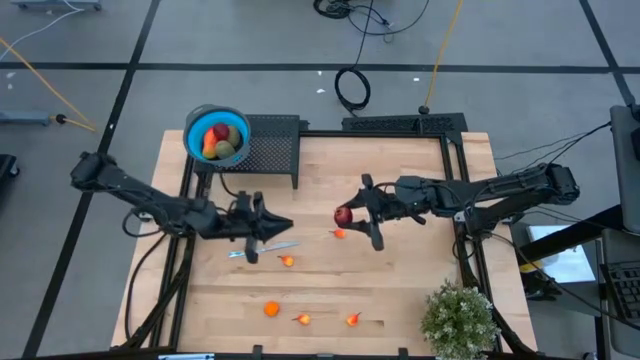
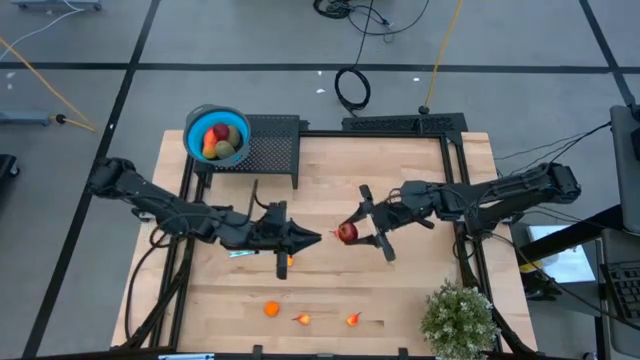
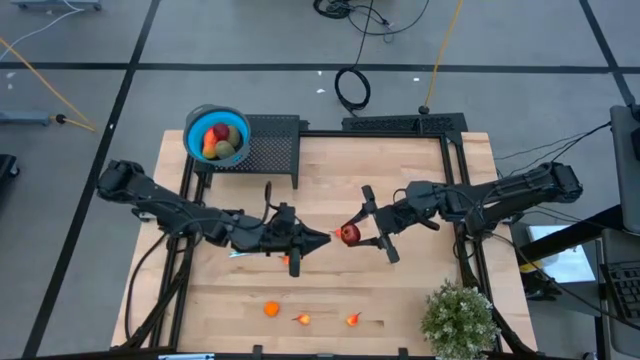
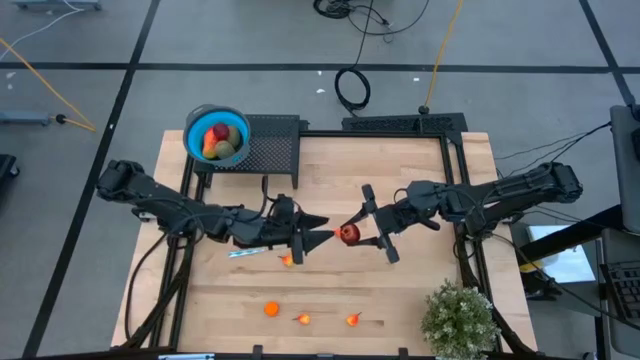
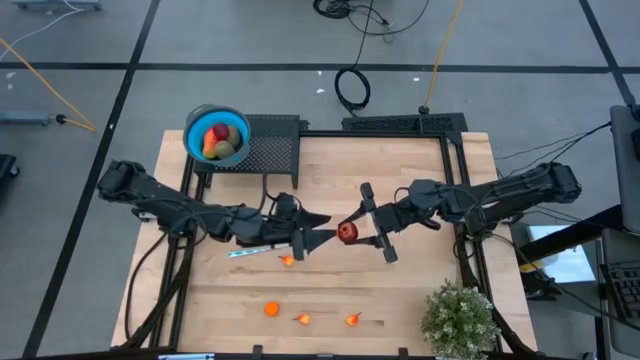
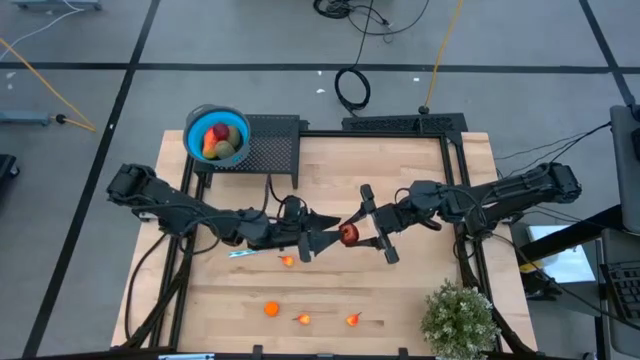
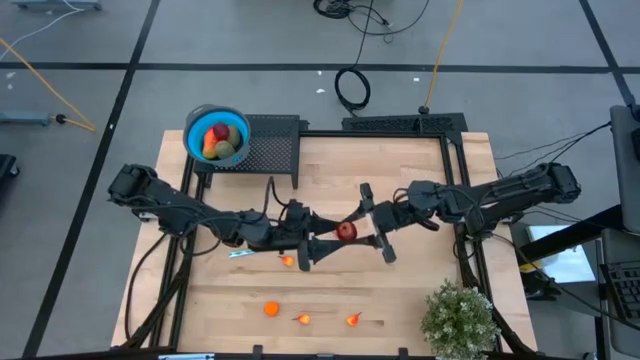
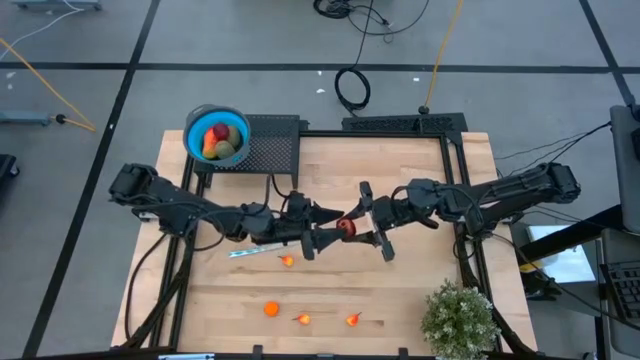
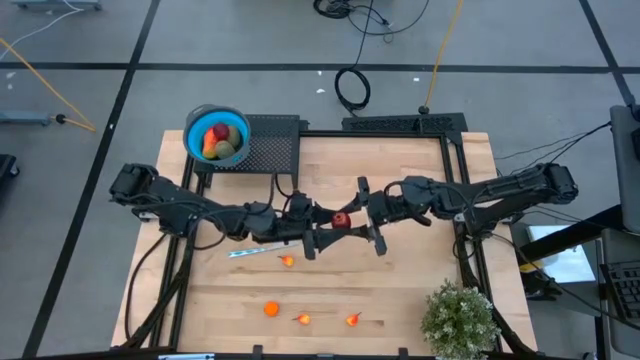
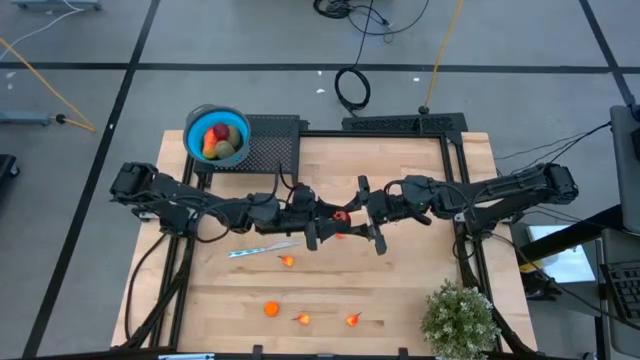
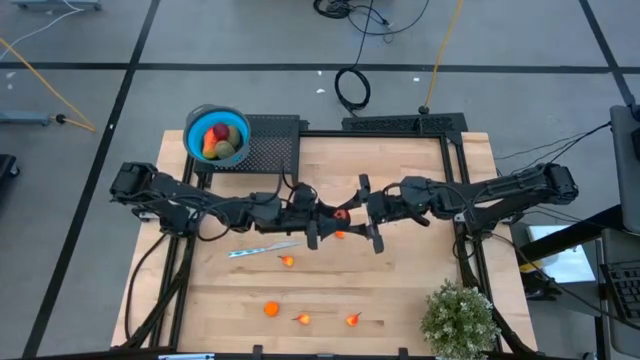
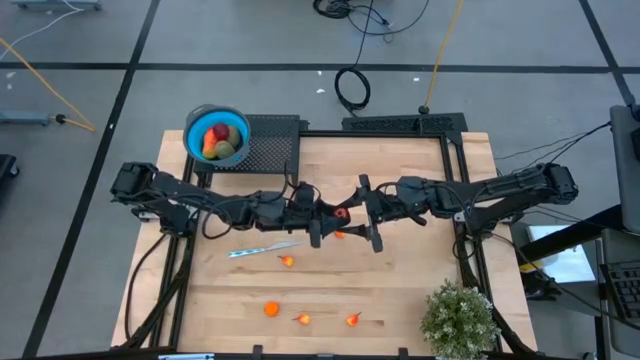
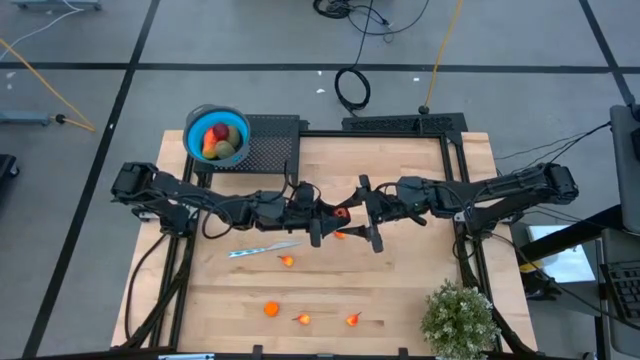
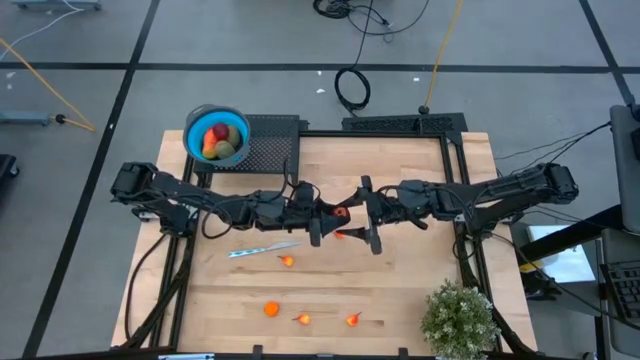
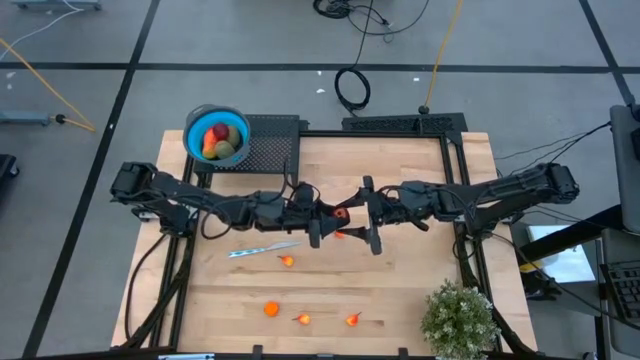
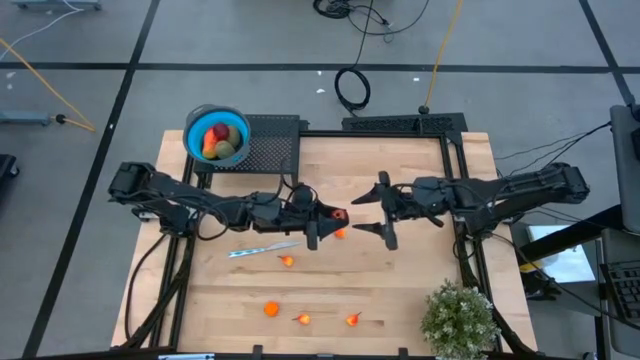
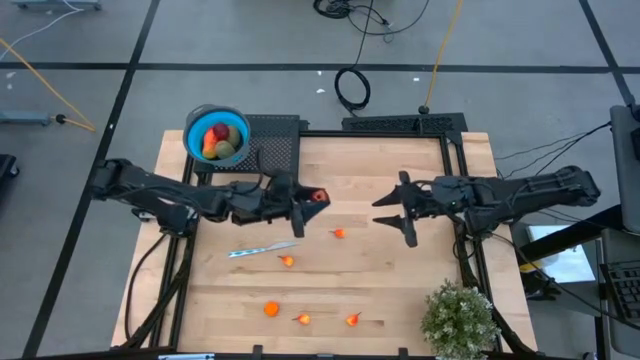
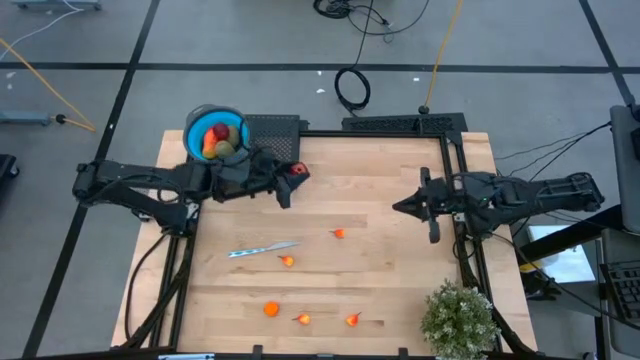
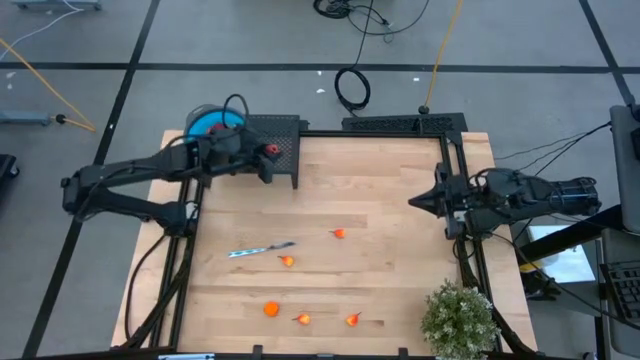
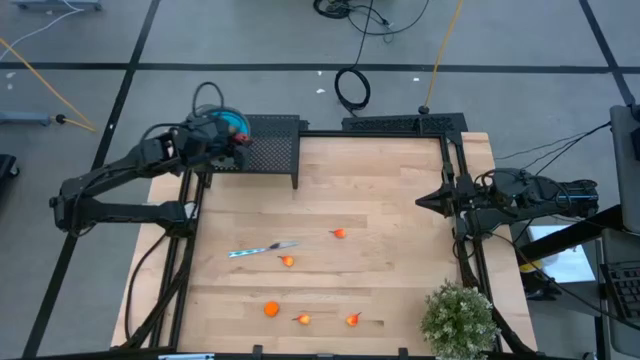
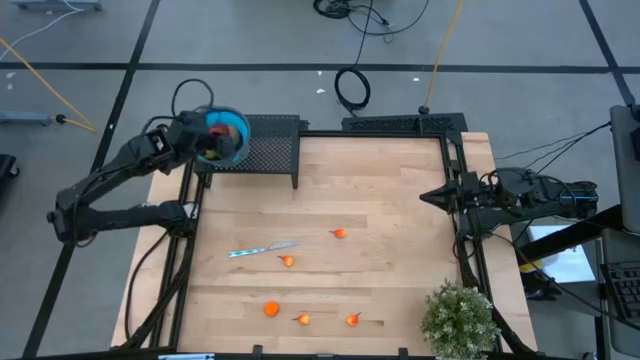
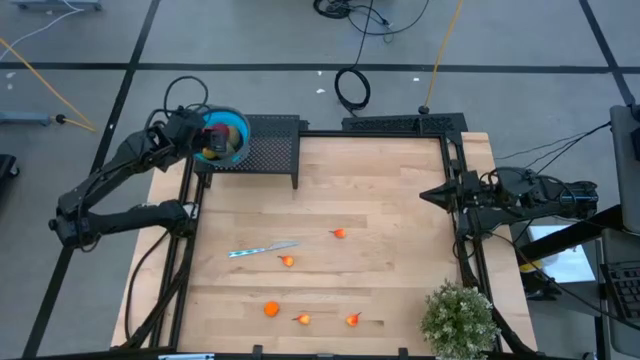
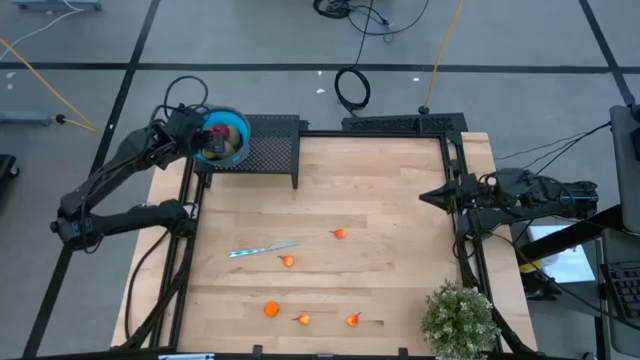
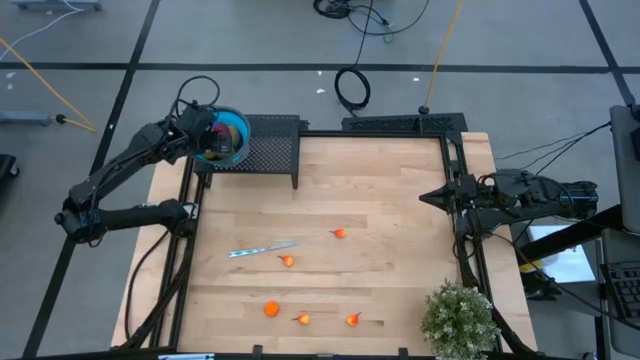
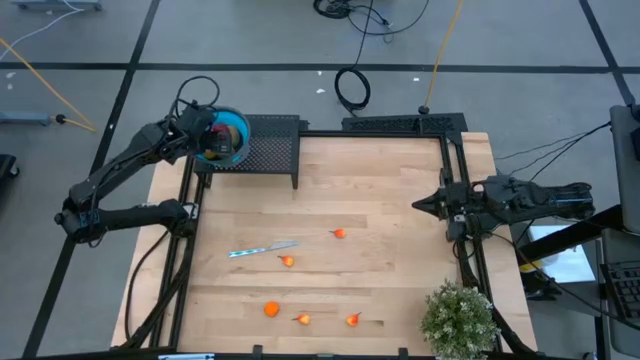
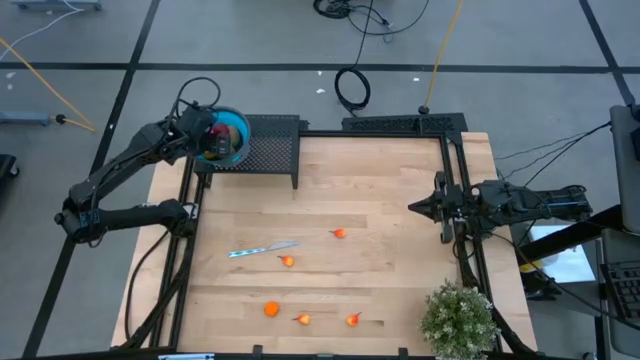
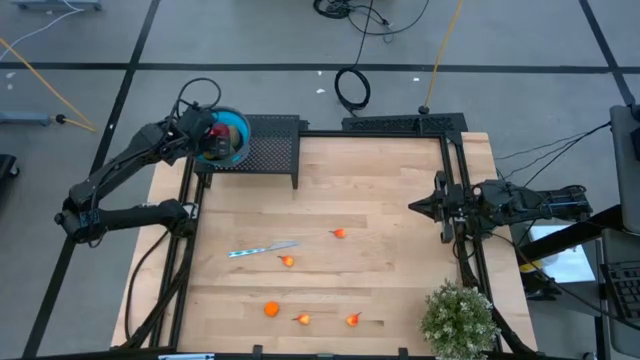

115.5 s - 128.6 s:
Task: Pick & Place Fruit
Put the pomegranate into the blue strainer bowl on the shelf

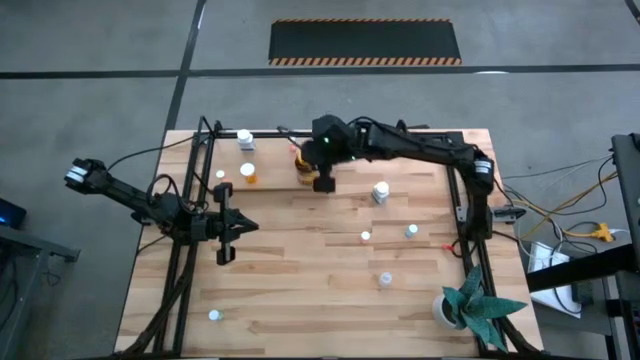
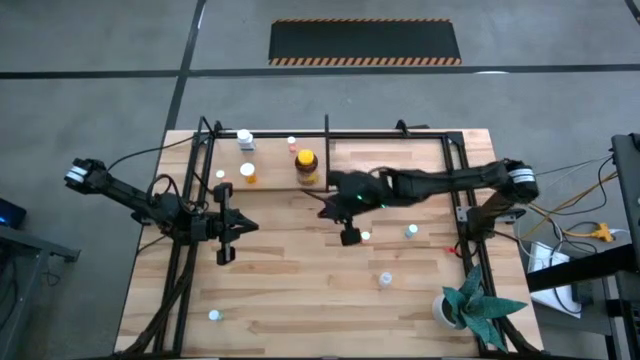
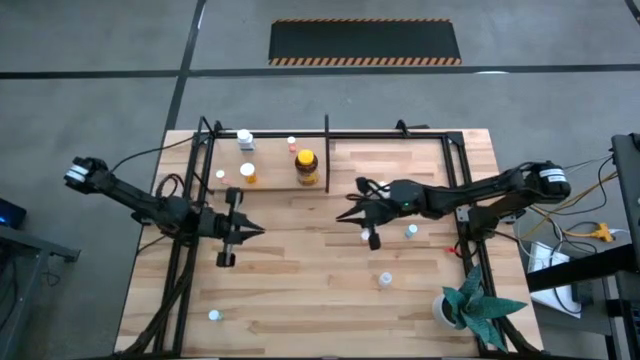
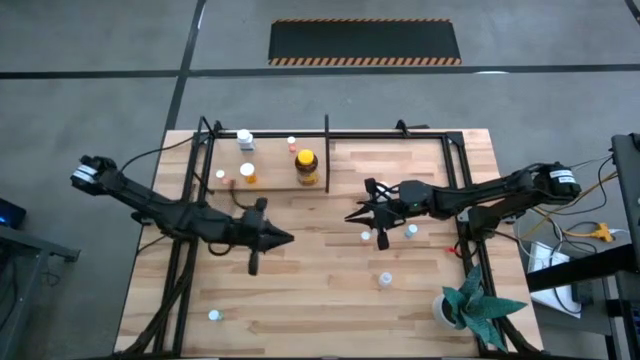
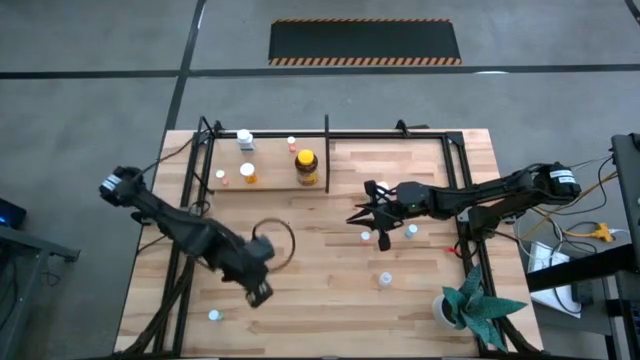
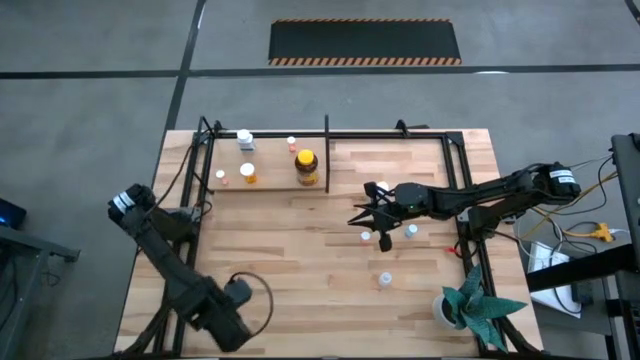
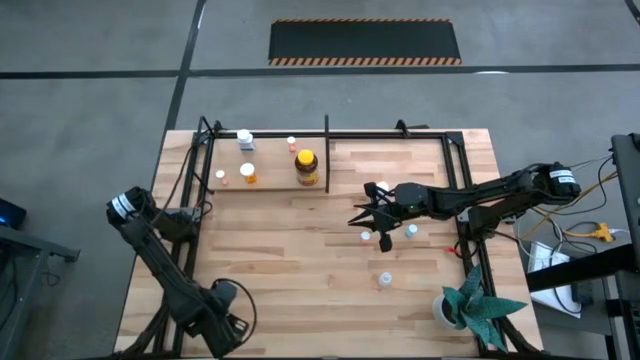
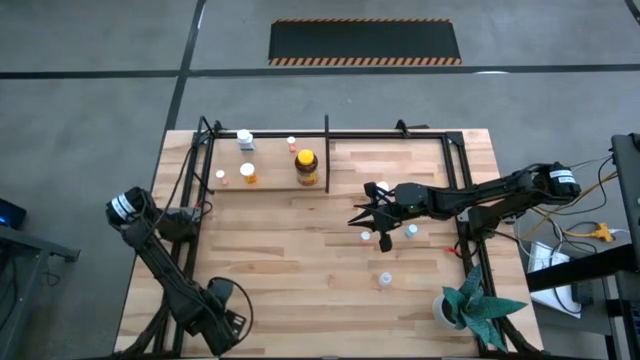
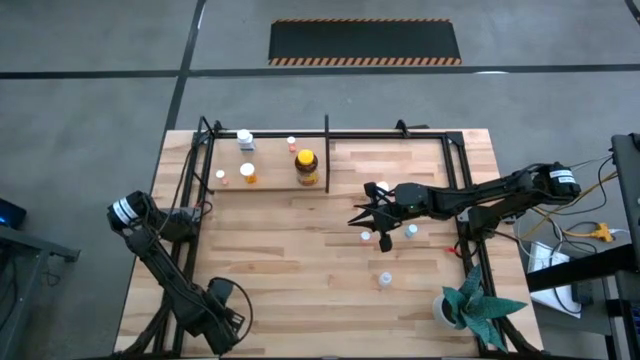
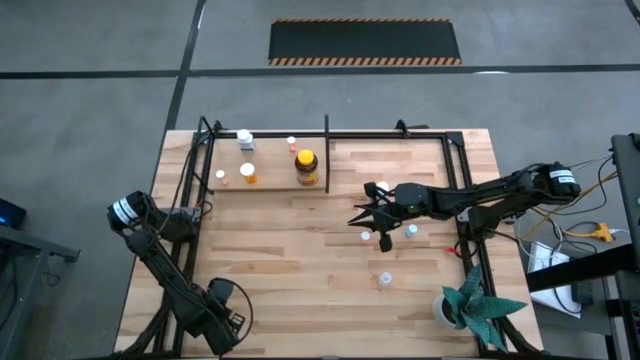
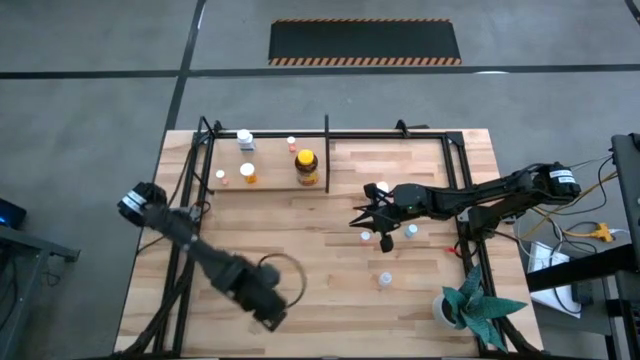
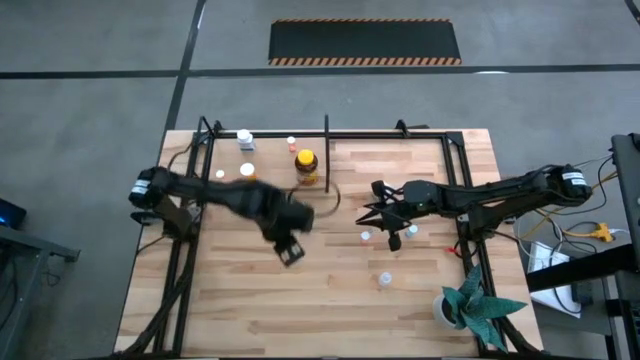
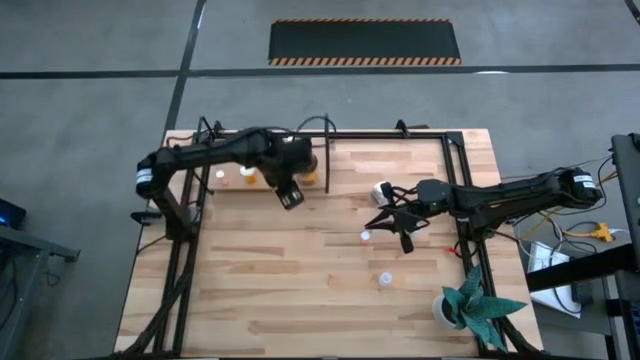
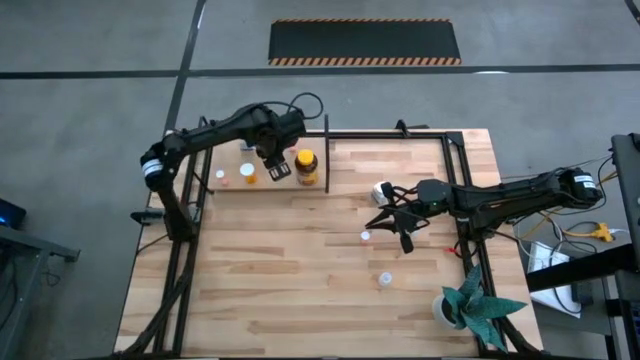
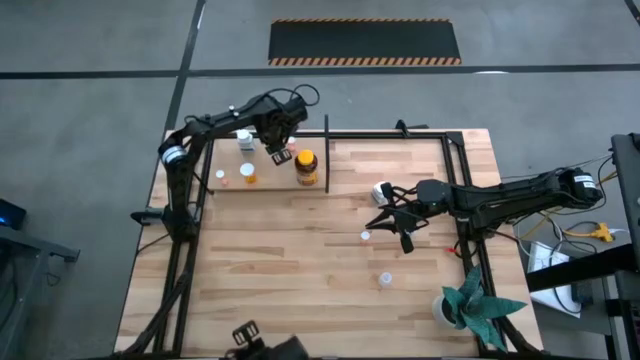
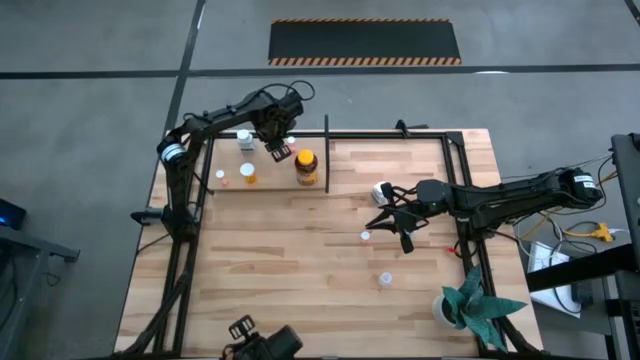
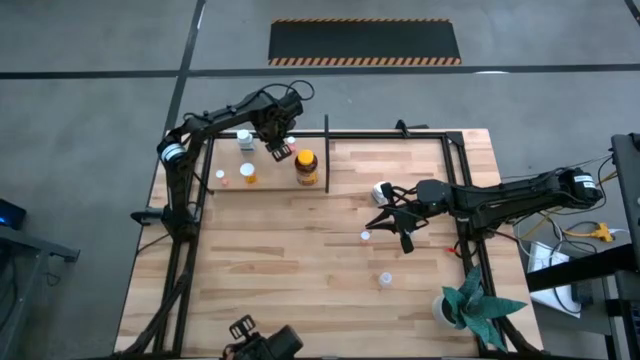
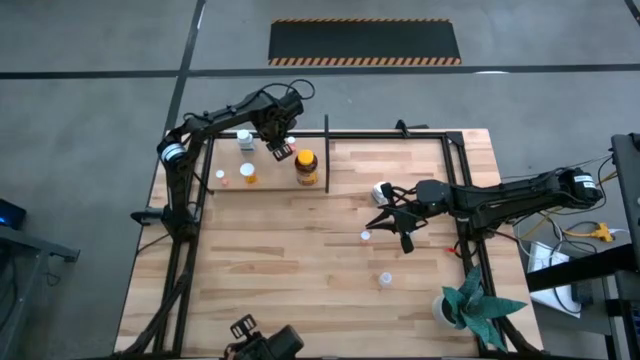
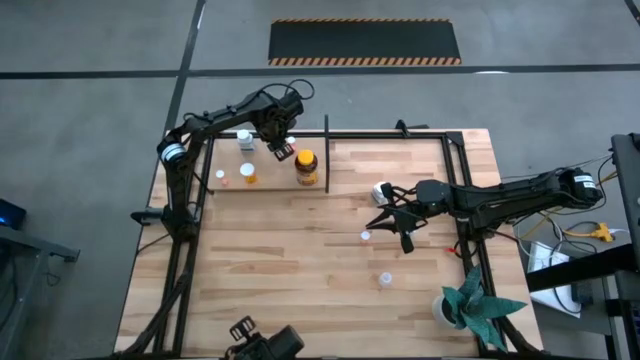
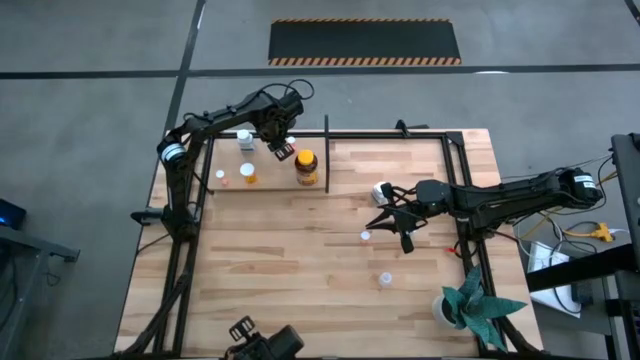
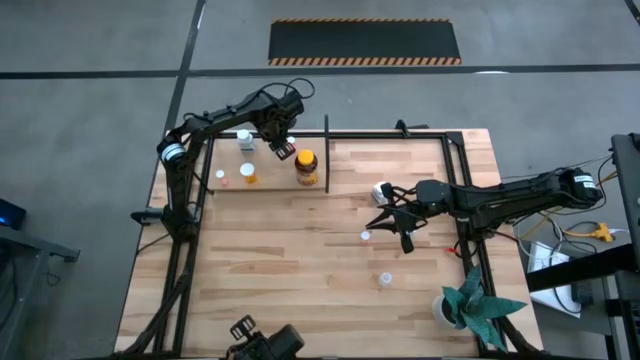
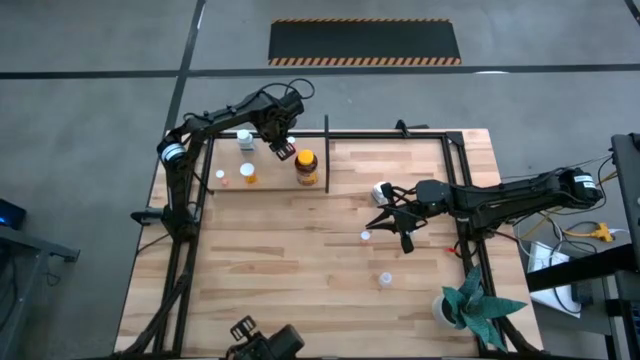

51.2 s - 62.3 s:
Task: Pick and place medicine bottles onto shelf by color
Put the bottom blue pill bottle on the shelf
